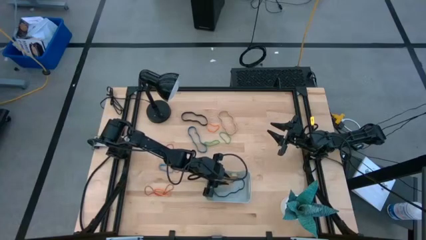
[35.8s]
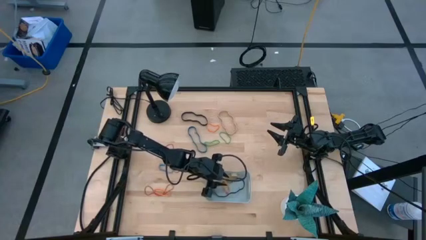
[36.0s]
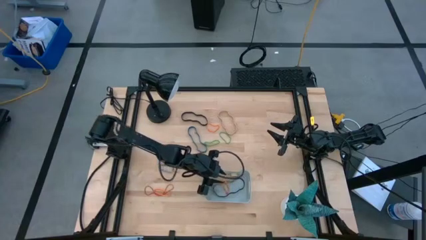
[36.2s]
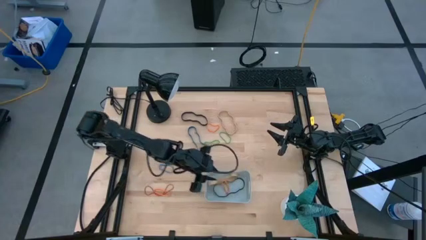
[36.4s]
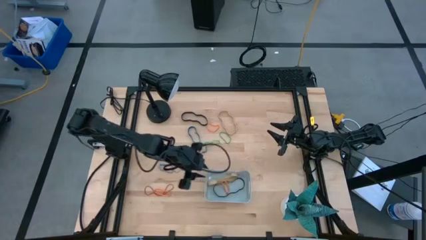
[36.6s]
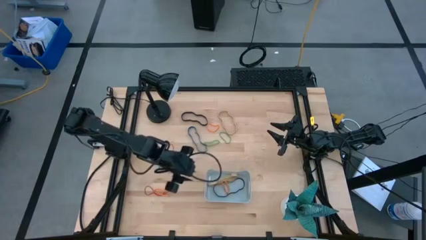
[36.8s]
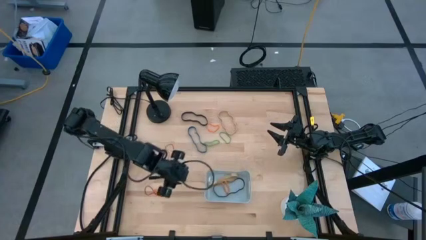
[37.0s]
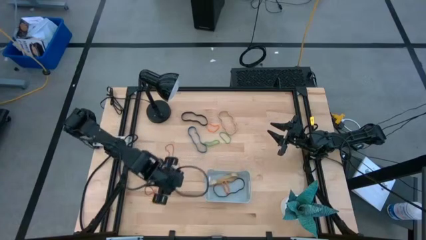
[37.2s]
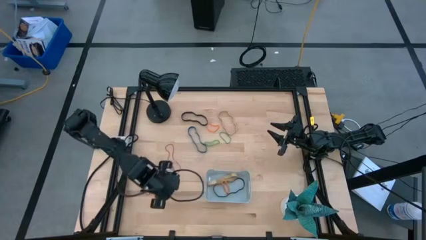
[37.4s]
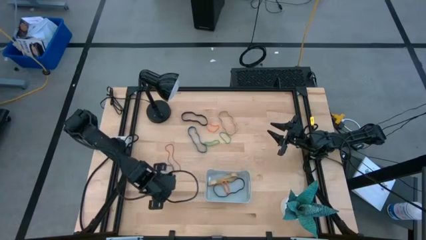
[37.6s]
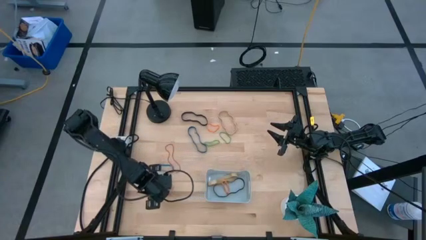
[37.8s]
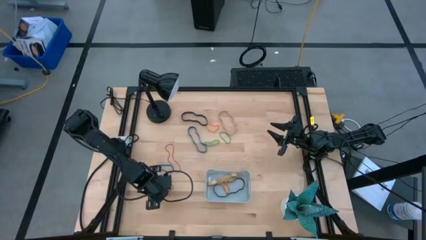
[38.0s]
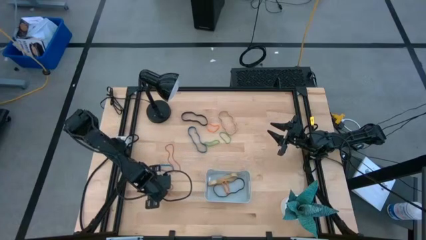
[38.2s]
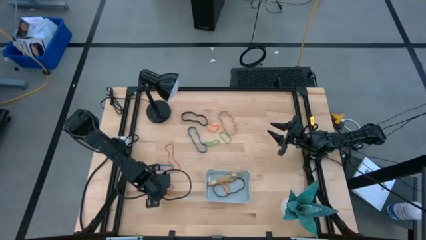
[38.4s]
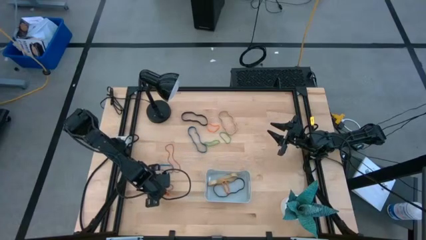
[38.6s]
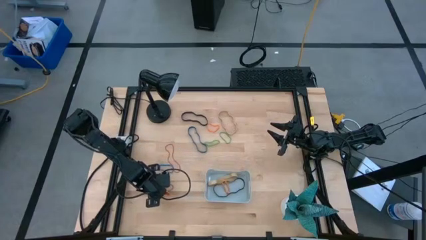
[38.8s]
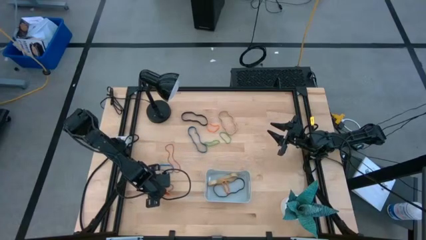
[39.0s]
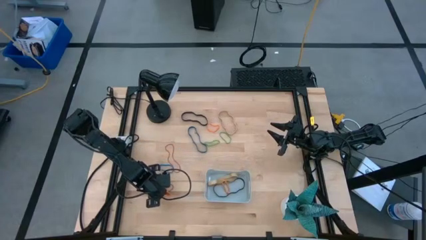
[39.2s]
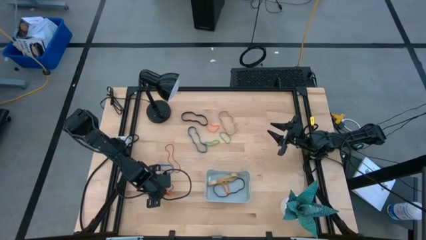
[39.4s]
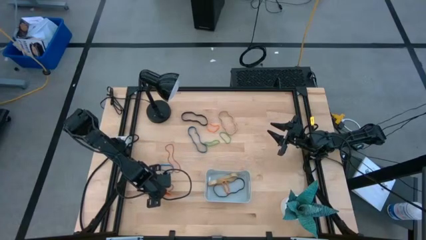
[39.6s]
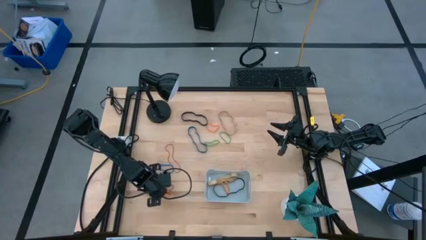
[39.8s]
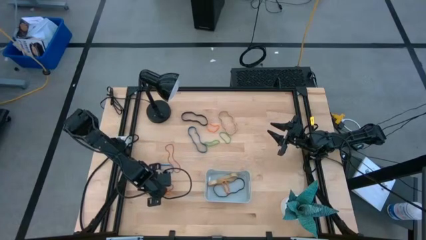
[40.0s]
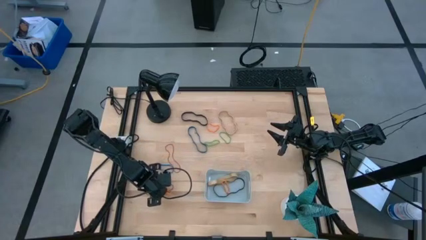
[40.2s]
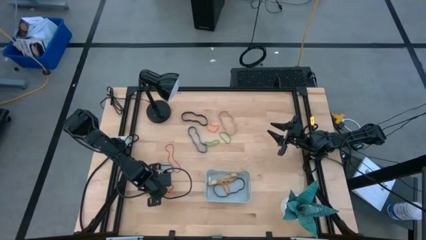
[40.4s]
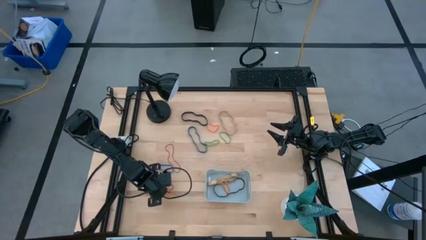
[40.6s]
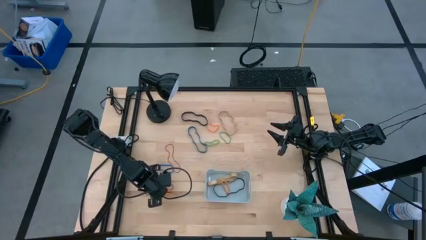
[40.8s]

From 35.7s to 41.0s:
Task: Pick and place rubber bands into bin
Put the bottom orange rubber band into the gray bin

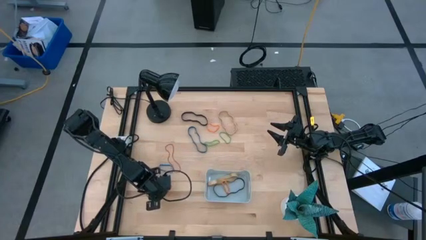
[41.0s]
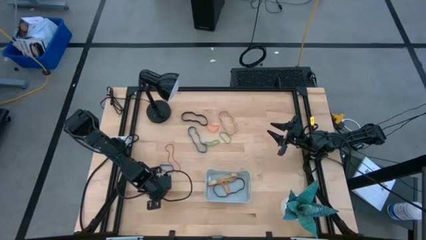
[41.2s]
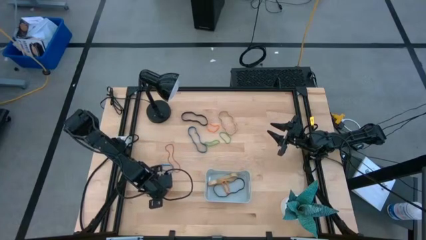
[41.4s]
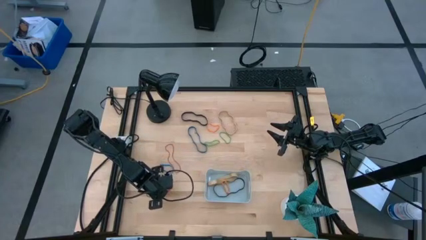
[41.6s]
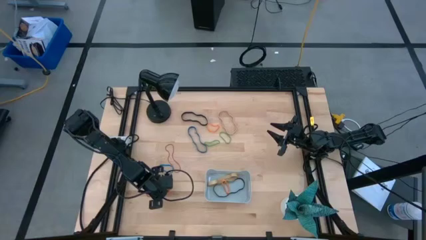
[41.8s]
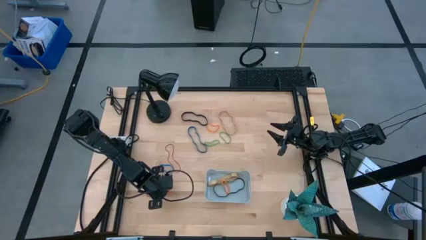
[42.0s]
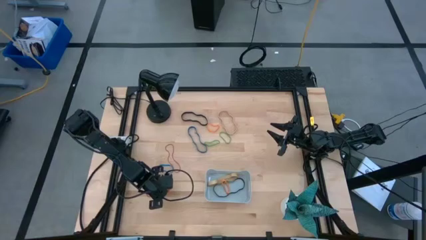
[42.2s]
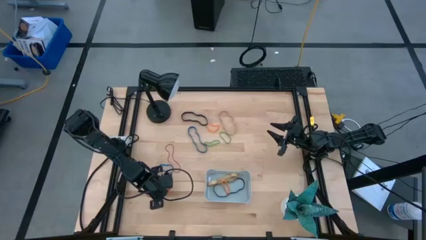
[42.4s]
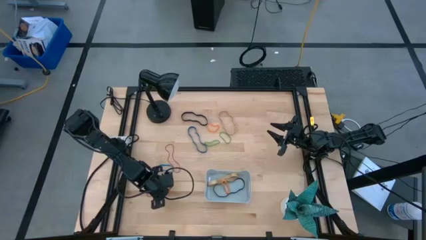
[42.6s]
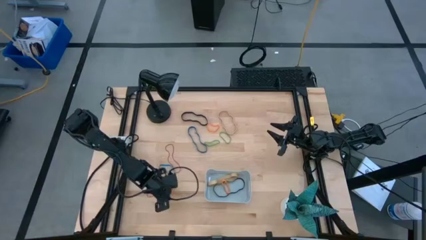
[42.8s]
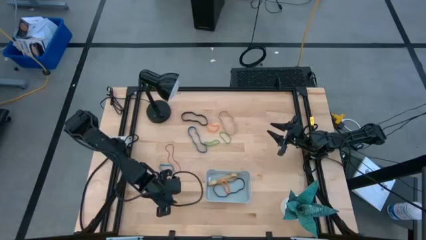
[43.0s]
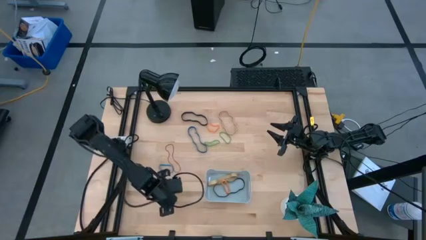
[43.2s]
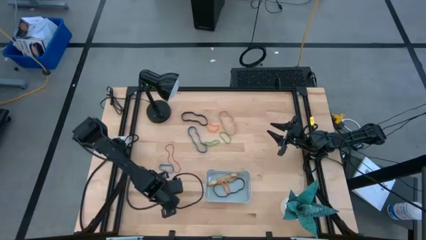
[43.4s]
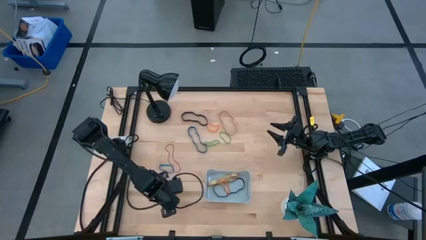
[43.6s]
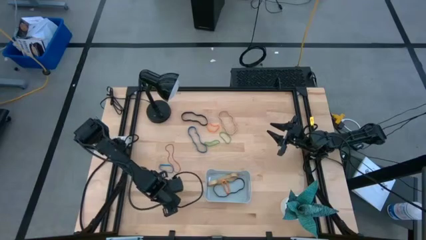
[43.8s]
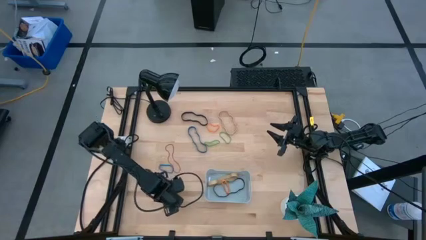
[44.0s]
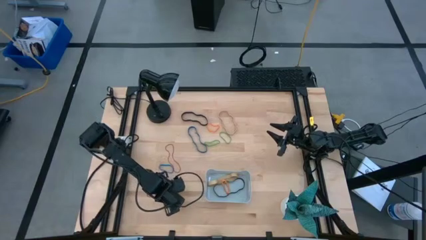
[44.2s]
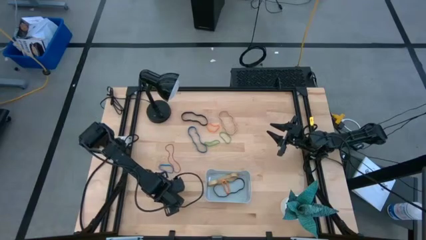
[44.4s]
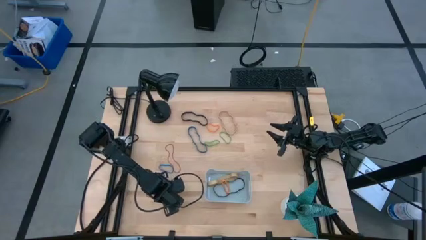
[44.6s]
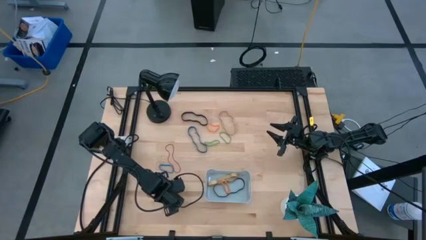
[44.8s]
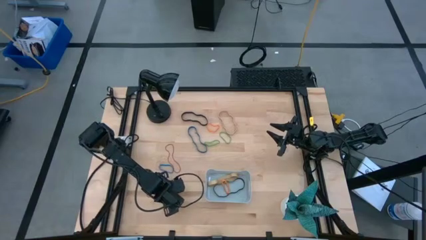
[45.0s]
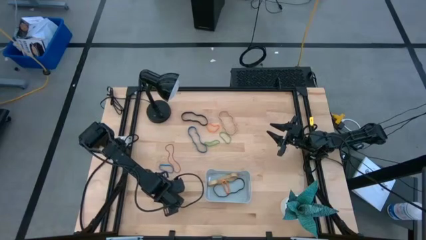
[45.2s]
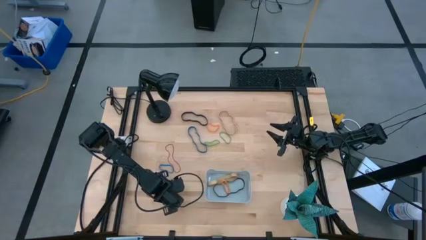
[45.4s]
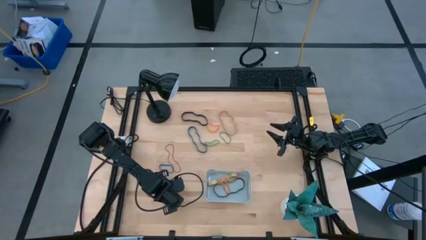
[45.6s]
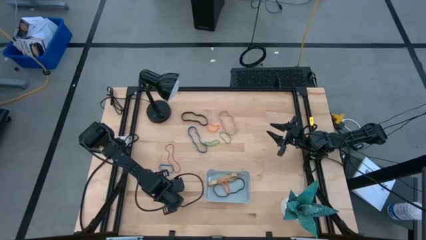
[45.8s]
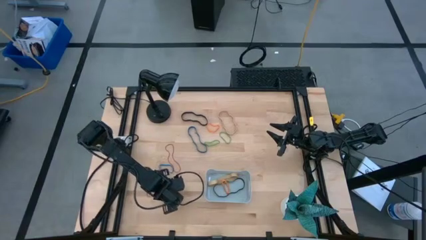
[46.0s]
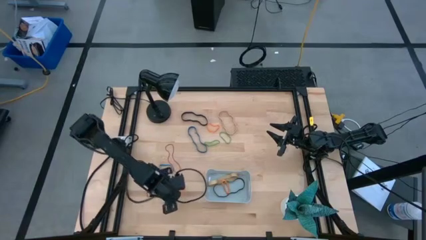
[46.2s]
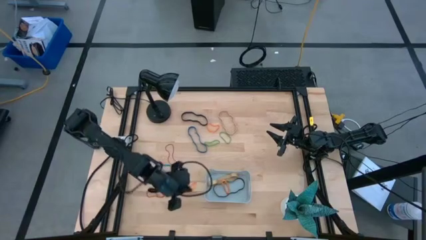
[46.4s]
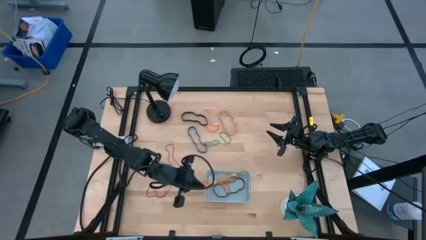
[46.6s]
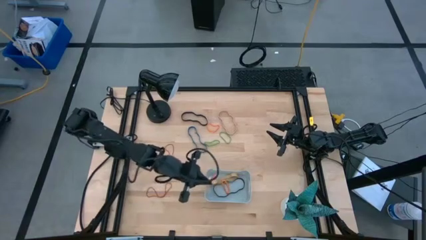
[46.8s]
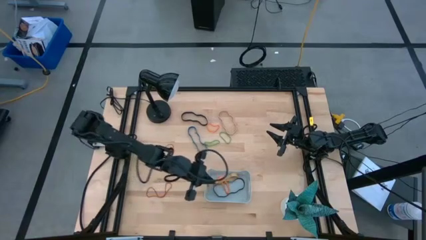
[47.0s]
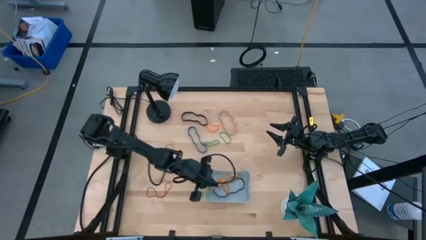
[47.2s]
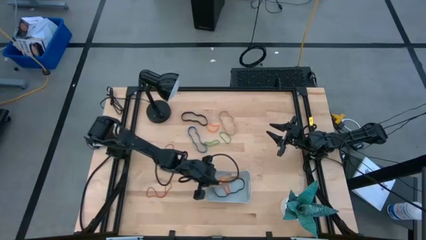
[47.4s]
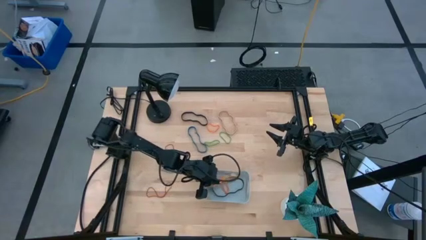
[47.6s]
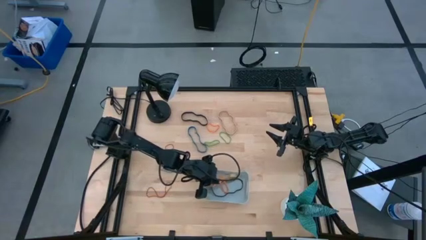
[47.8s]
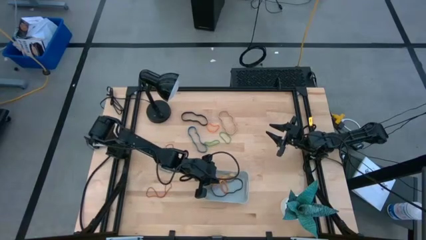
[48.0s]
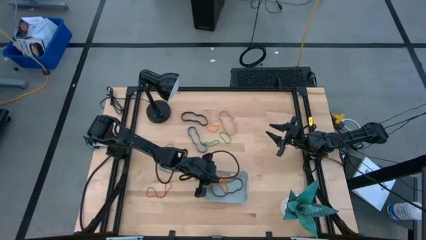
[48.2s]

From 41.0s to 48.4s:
Put the bottom orange rubber band into the gray bin
